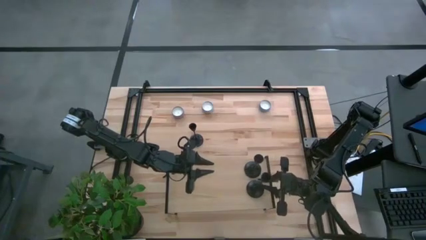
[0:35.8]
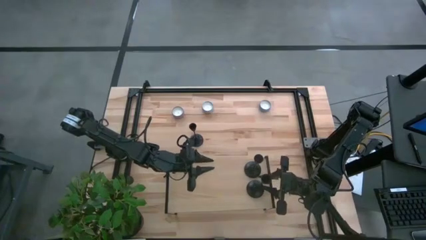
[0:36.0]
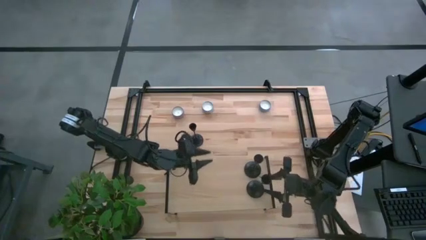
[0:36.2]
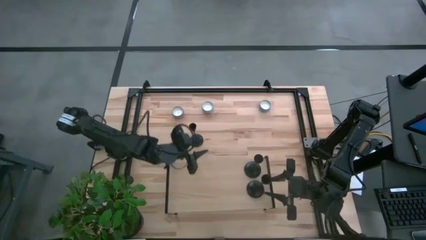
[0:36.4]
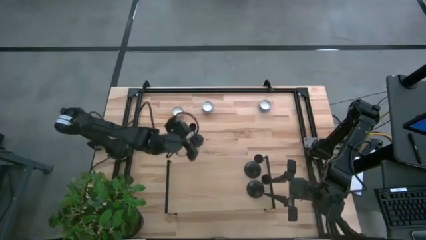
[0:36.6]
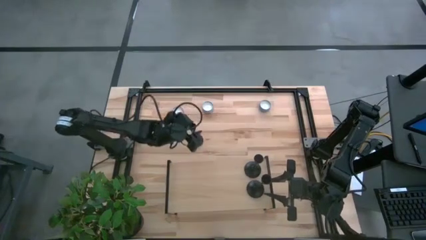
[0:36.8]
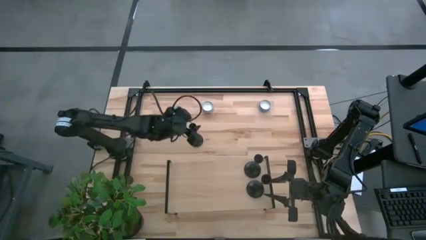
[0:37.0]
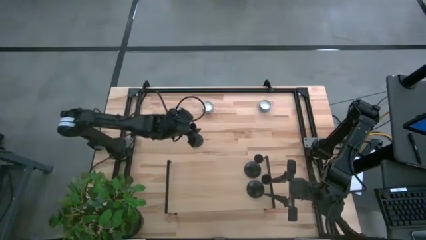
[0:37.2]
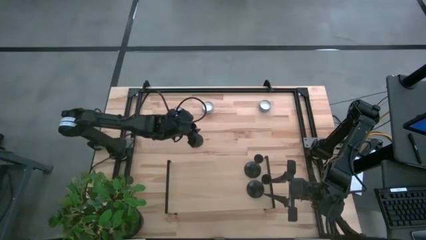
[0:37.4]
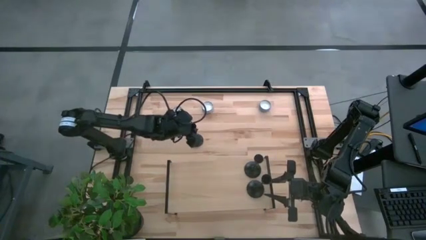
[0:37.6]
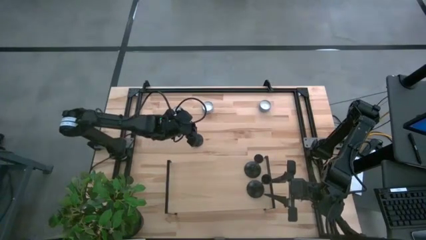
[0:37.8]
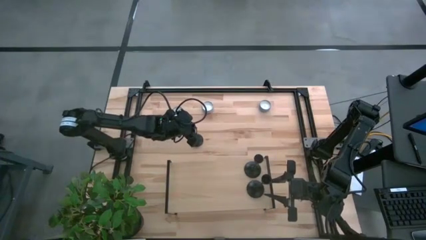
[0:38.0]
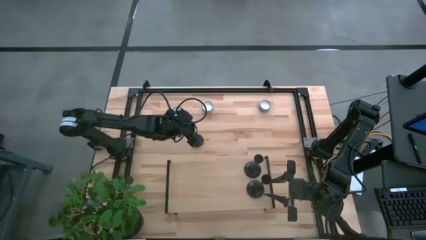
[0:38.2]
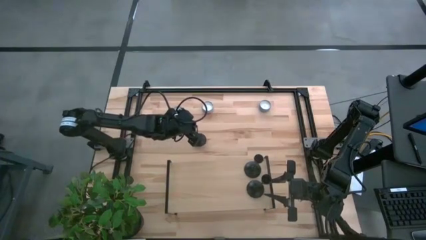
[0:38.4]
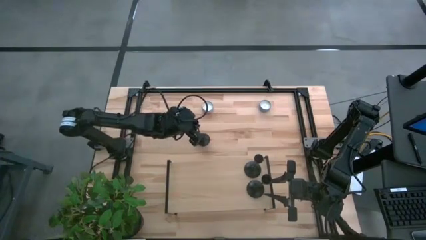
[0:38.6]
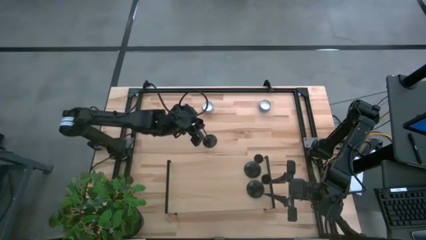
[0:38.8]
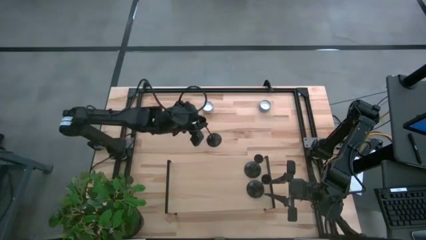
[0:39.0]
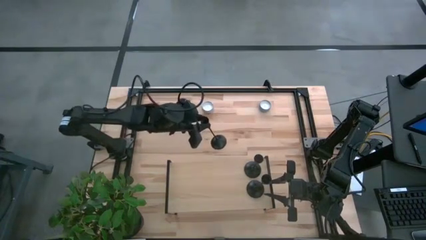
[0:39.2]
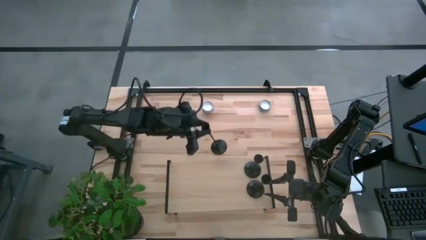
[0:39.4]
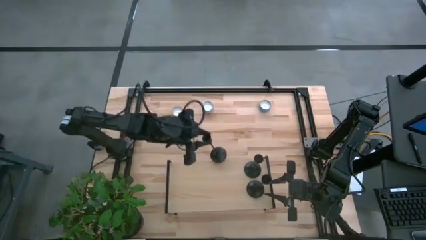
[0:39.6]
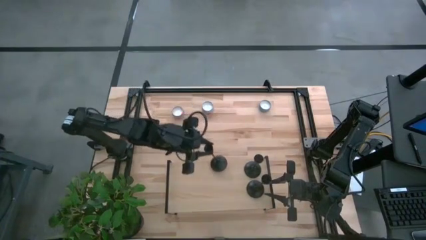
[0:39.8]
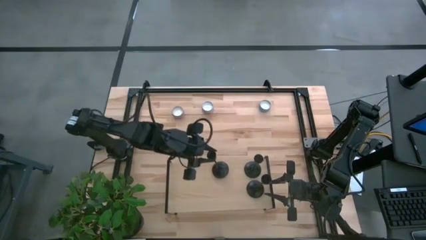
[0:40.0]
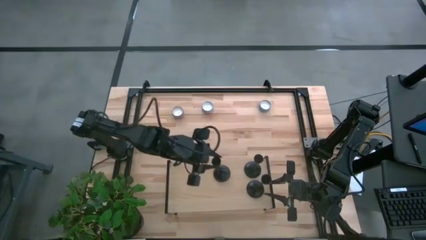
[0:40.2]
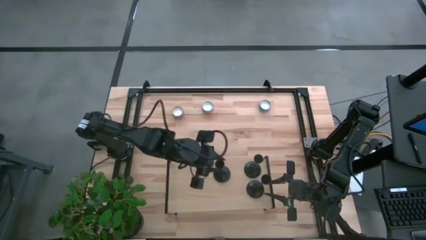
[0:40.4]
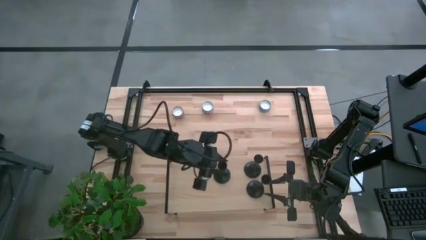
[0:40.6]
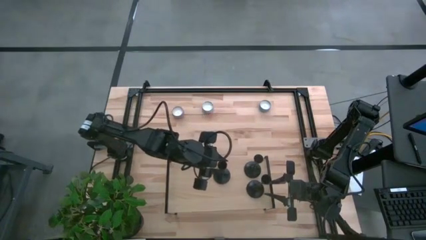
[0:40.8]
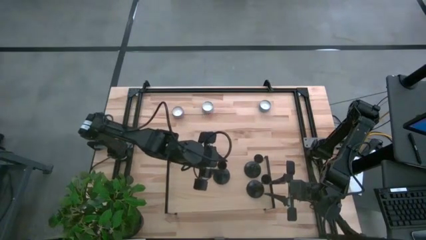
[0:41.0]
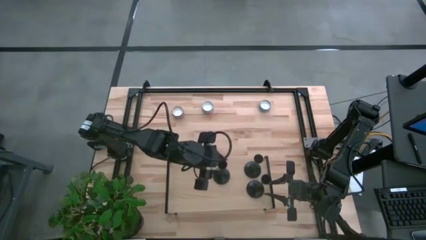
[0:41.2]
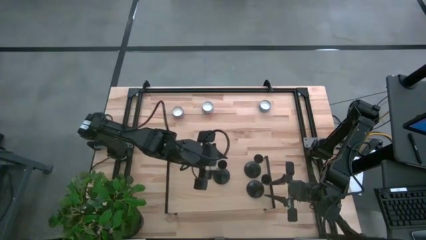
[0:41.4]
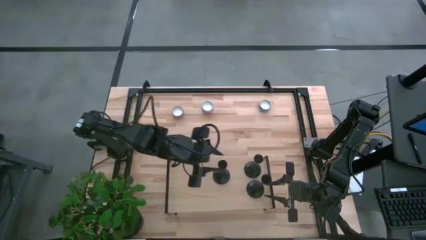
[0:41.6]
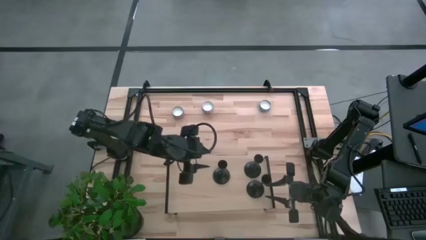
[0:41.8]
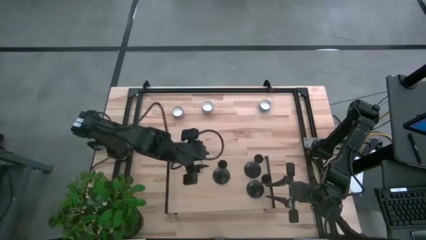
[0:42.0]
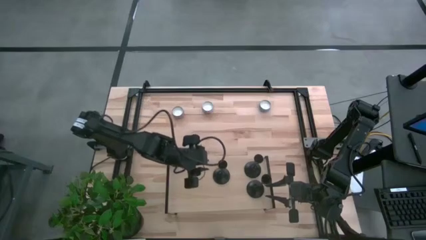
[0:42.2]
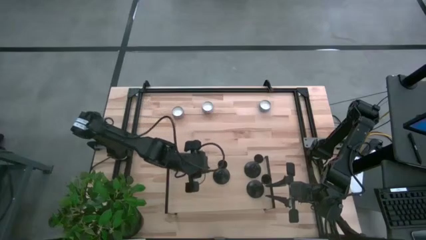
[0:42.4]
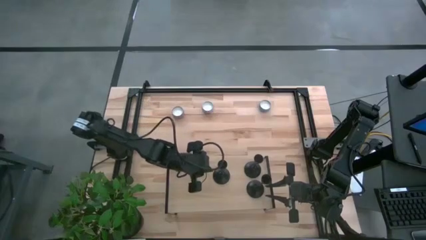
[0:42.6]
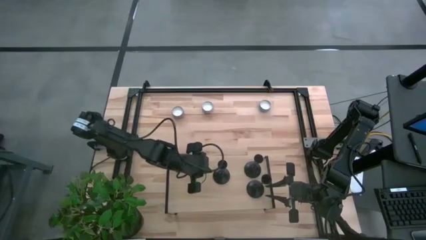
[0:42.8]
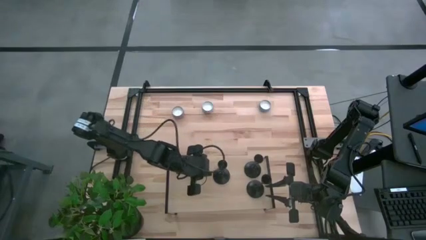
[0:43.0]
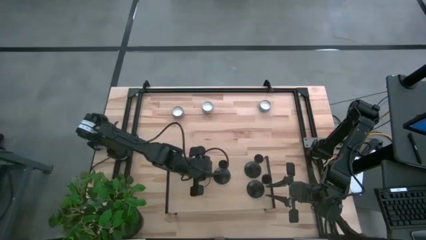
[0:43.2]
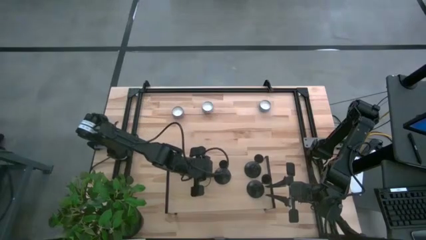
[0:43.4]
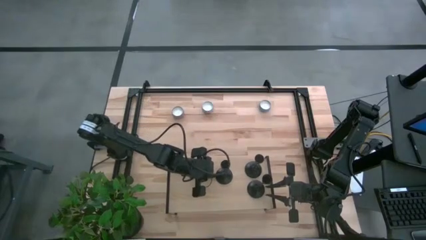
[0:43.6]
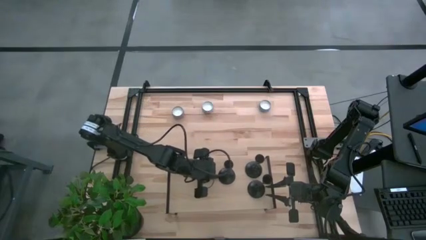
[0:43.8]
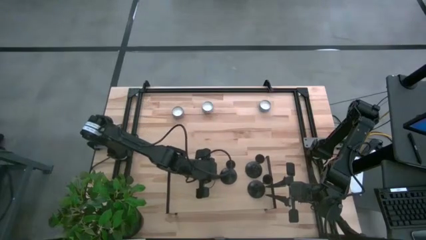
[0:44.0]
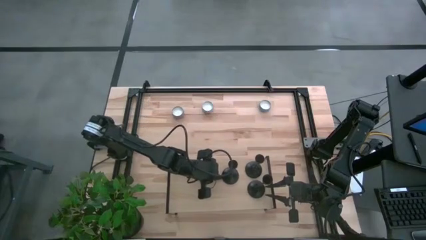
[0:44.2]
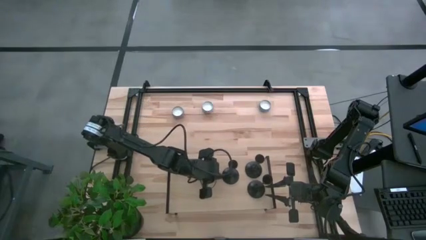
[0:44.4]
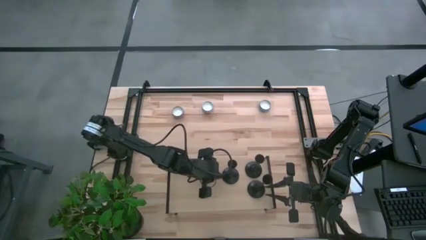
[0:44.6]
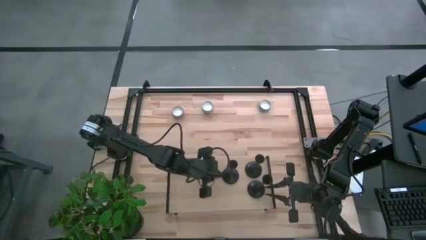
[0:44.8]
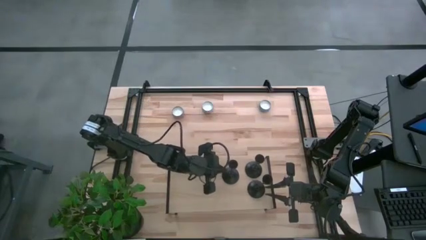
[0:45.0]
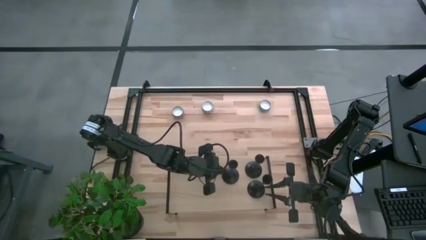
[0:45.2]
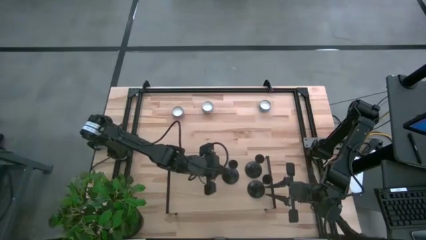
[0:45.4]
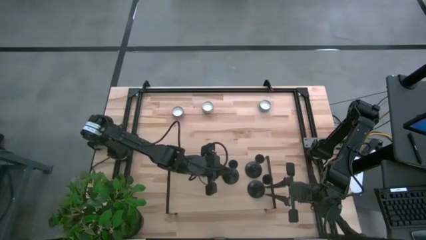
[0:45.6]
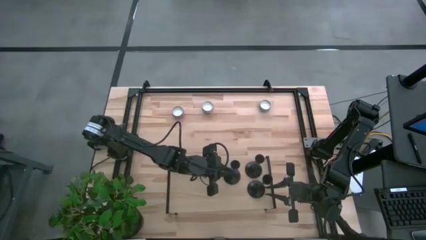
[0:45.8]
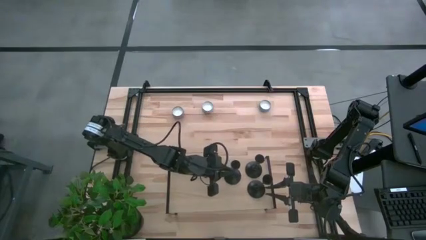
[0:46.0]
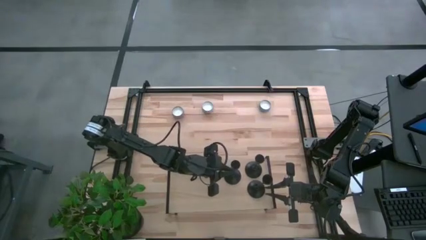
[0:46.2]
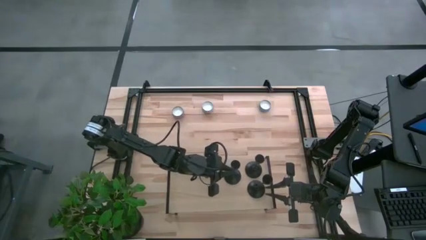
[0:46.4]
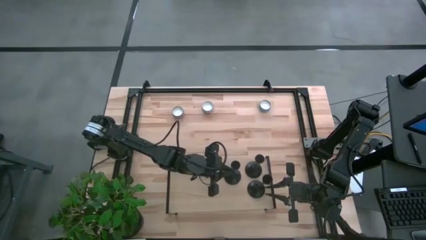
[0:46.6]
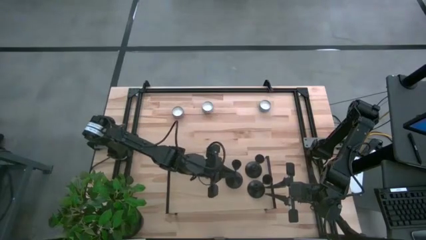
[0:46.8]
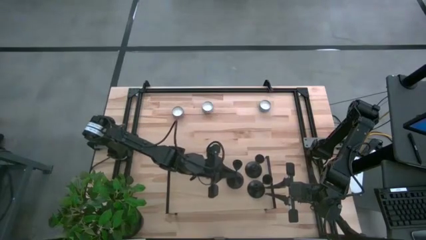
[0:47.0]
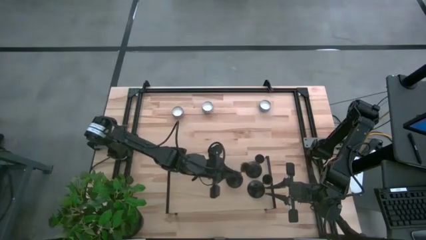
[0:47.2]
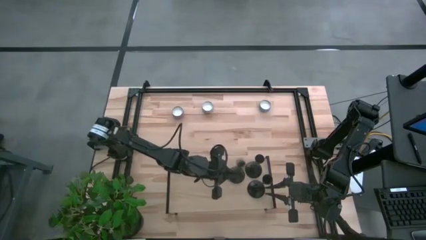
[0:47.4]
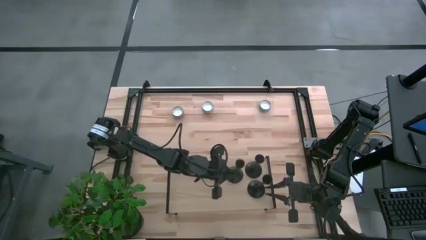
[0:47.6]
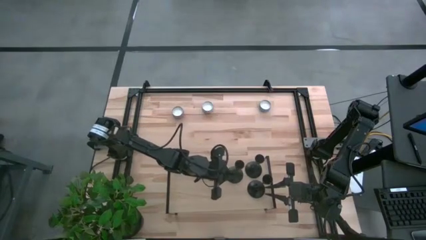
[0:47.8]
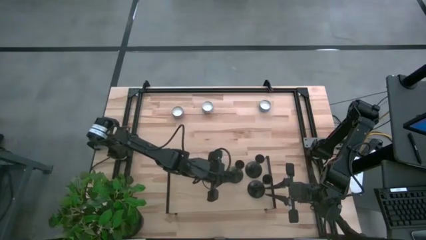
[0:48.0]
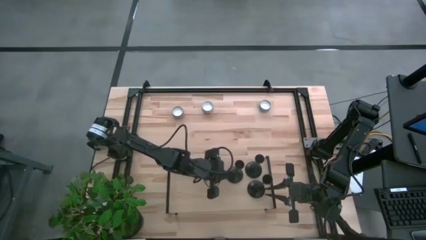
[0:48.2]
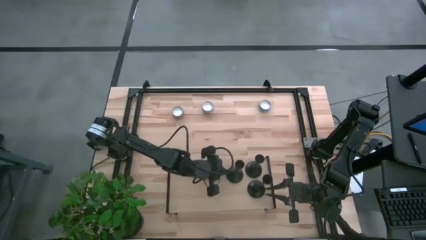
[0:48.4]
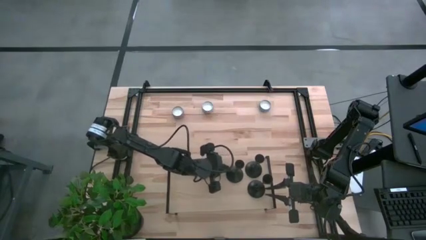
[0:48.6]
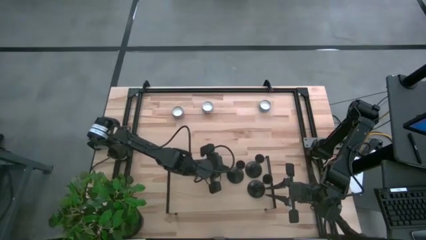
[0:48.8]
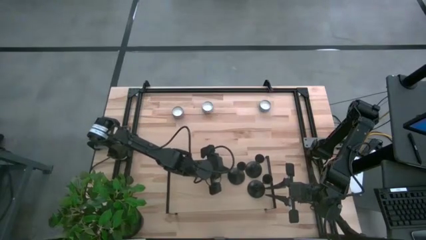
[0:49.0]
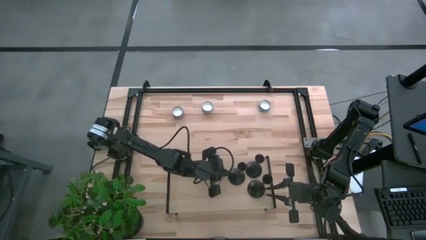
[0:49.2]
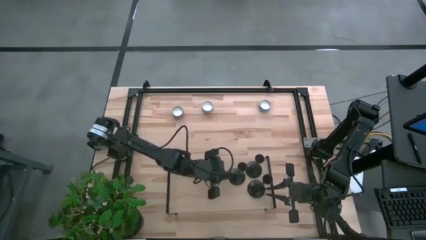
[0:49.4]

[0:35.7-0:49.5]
Task: Pick & Place candle stick holders
Put the candle holder on the shelf

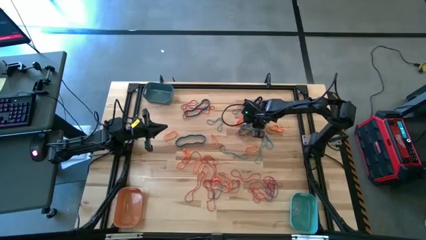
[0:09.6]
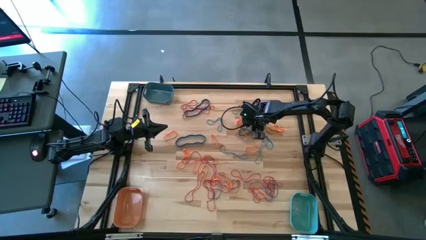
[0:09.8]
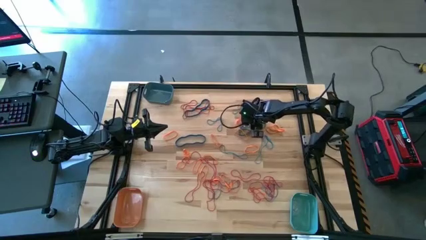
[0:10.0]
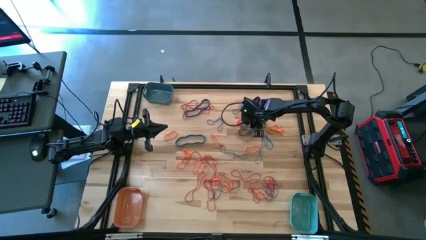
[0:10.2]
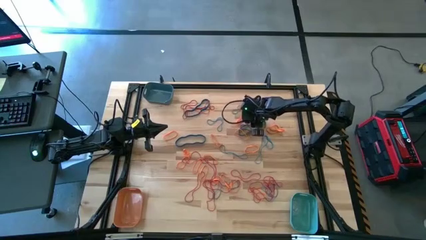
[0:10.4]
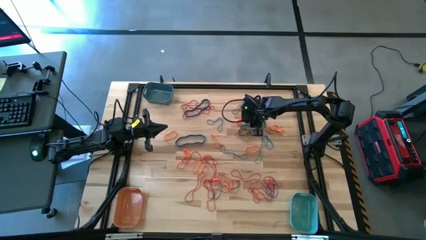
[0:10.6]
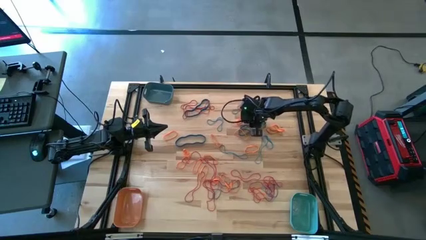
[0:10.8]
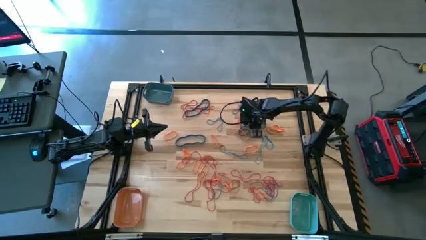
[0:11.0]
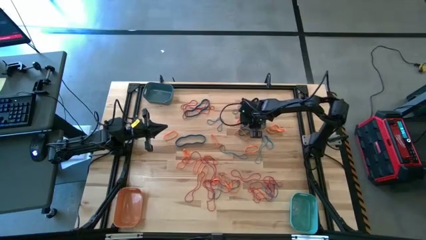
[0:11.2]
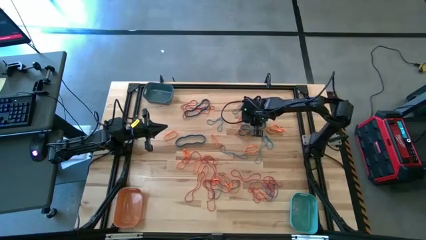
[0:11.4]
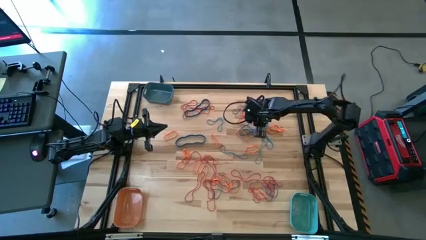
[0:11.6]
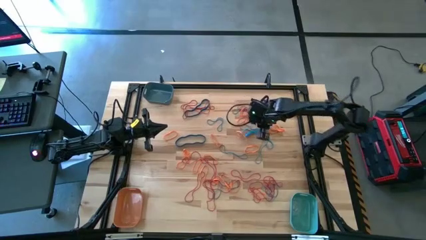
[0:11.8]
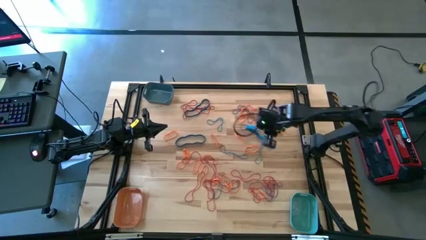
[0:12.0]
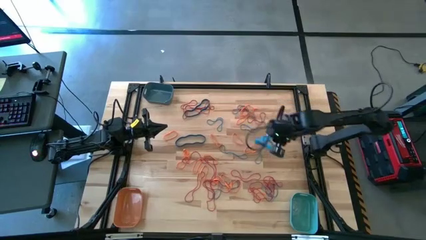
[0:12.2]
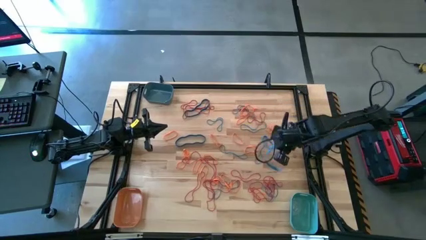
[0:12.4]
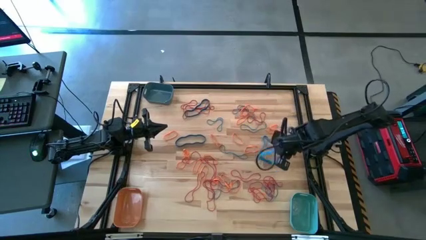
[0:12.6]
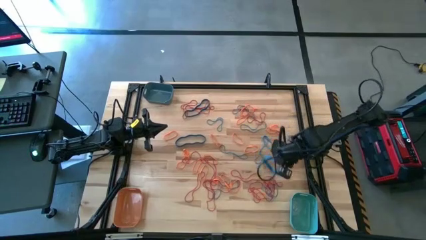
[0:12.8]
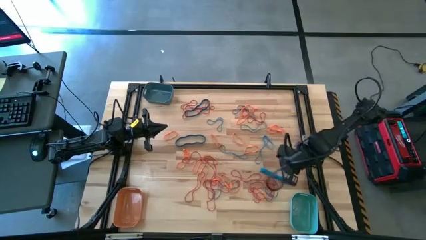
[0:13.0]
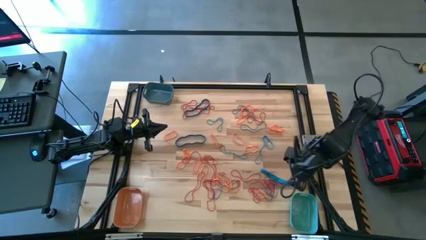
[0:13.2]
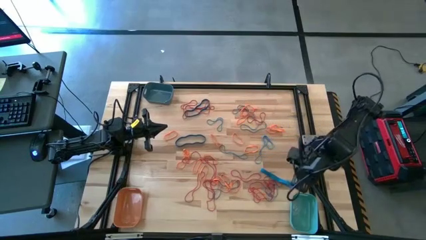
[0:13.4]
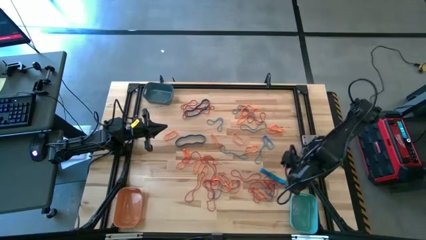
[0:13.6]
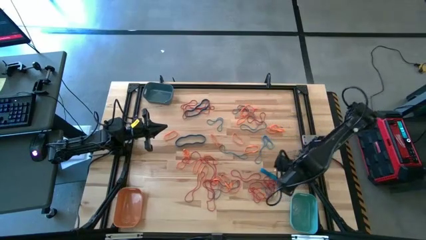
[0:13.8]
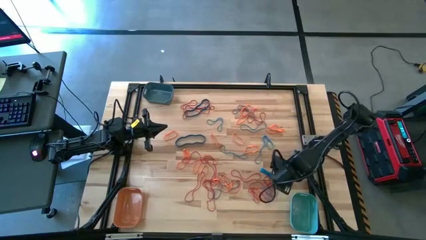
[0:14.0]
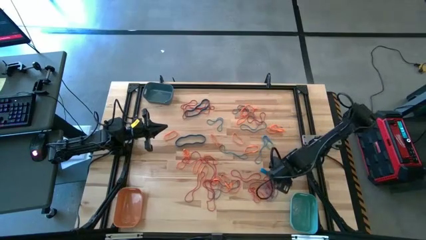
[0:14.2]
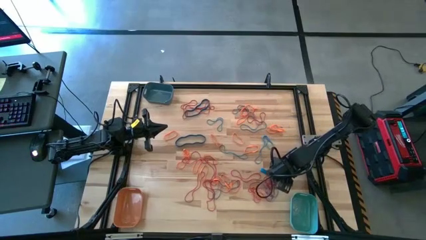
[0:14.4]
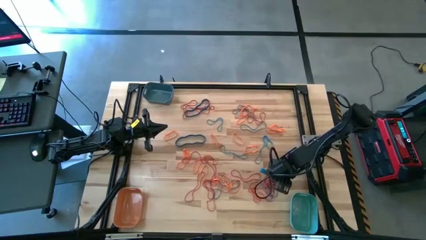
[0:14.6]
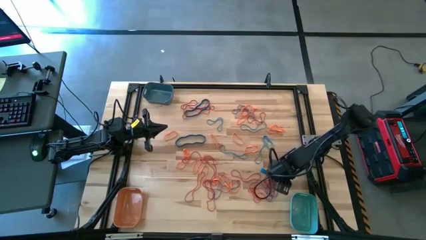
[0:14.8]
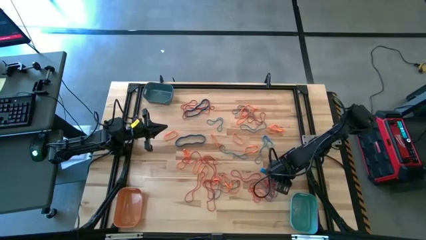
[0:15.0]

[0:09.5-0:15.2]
Task: Sort rubber bands into baskets
Put the blue rubber band into the light blue bin
